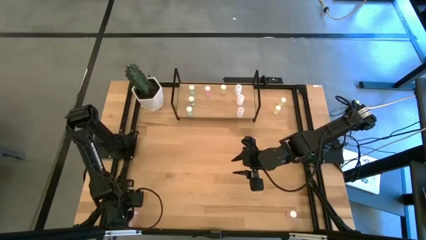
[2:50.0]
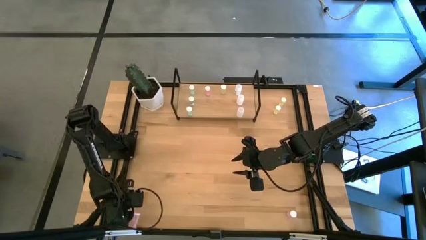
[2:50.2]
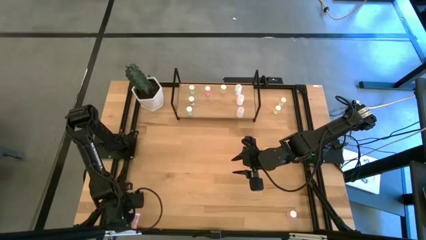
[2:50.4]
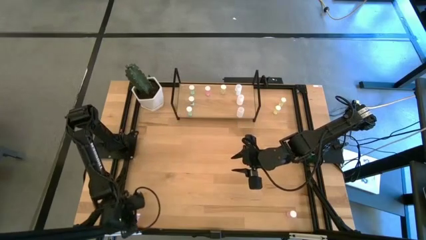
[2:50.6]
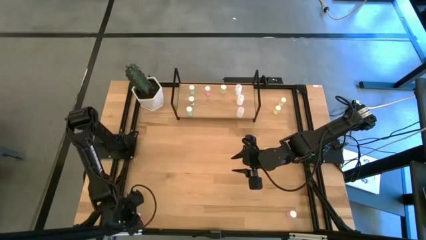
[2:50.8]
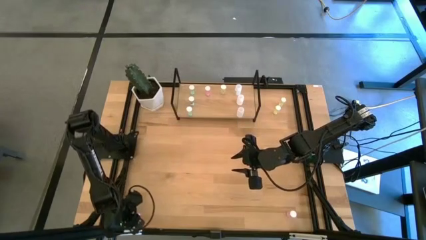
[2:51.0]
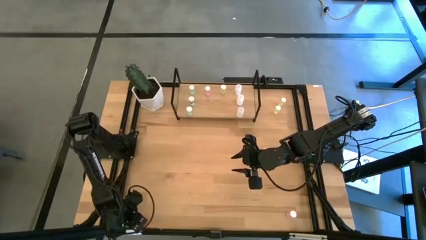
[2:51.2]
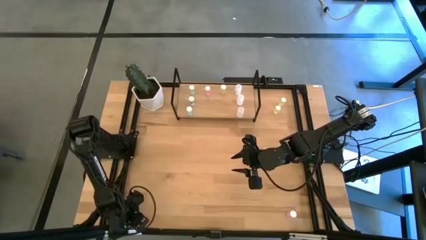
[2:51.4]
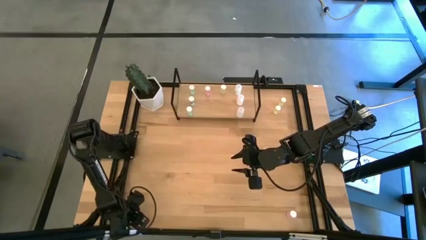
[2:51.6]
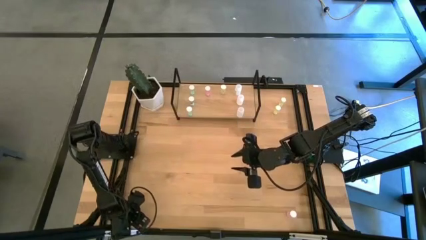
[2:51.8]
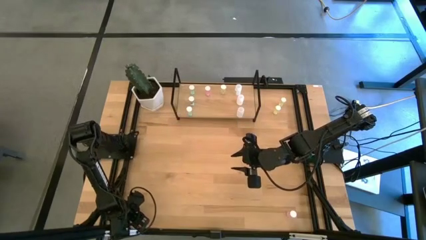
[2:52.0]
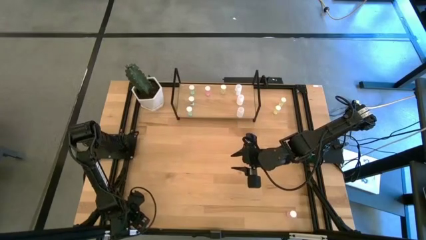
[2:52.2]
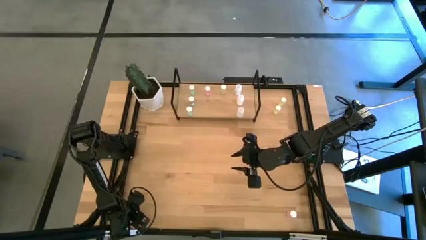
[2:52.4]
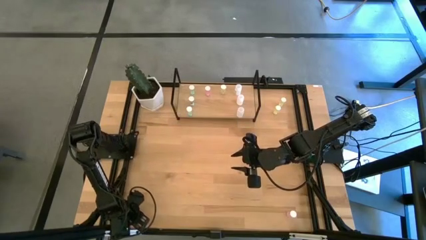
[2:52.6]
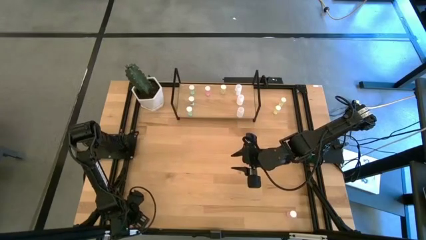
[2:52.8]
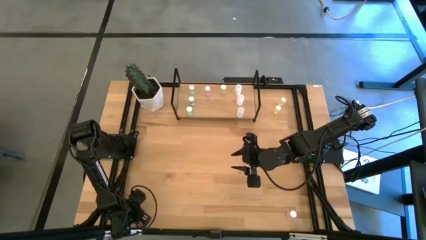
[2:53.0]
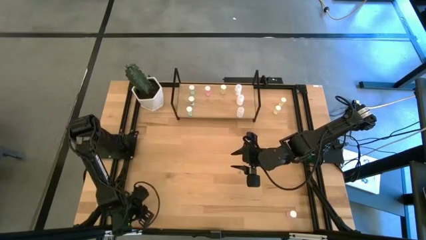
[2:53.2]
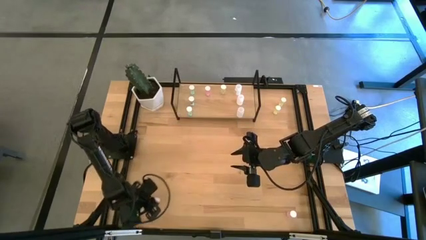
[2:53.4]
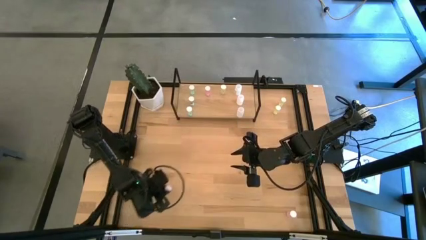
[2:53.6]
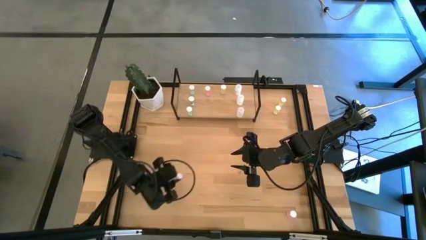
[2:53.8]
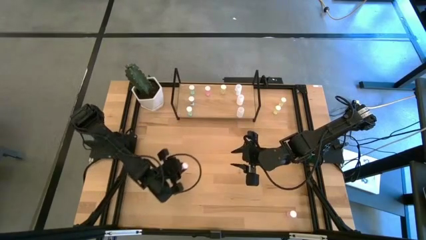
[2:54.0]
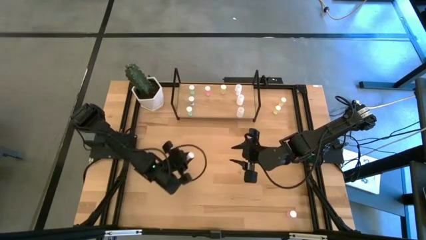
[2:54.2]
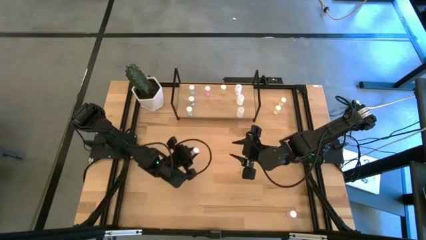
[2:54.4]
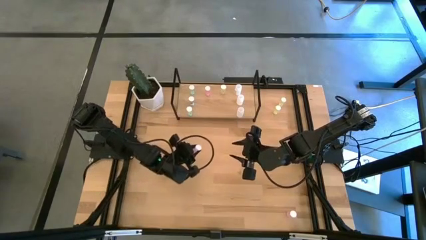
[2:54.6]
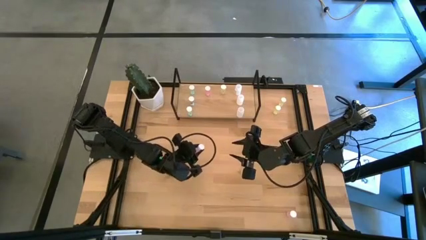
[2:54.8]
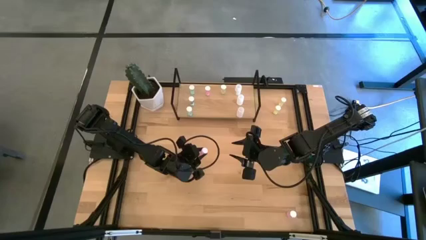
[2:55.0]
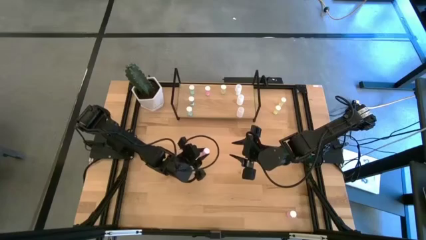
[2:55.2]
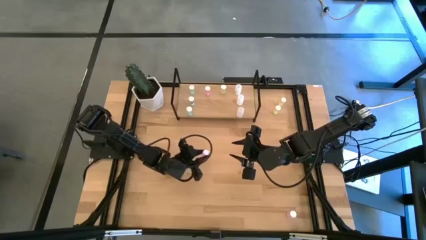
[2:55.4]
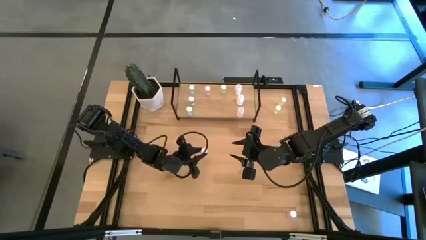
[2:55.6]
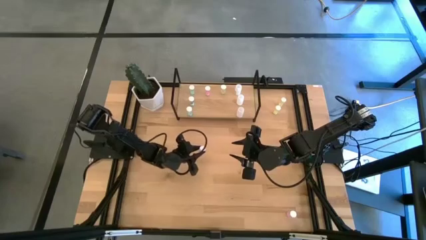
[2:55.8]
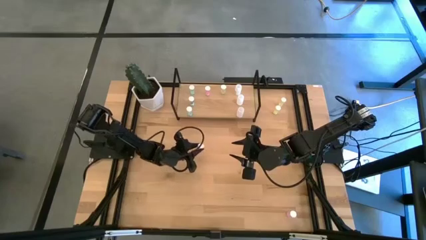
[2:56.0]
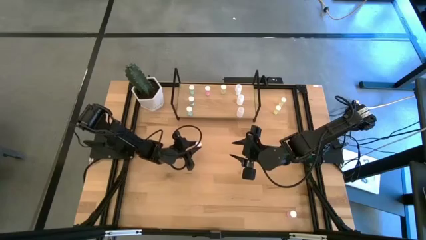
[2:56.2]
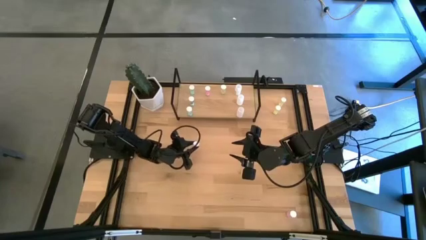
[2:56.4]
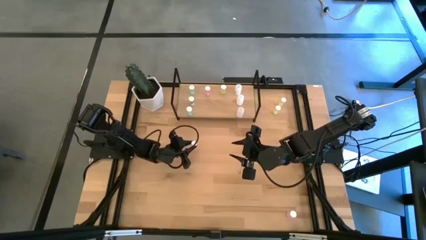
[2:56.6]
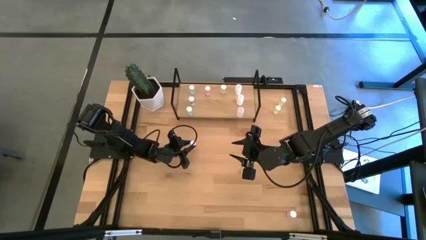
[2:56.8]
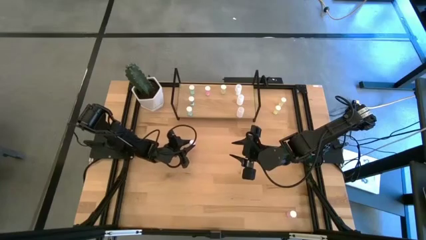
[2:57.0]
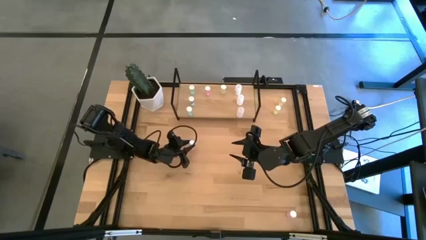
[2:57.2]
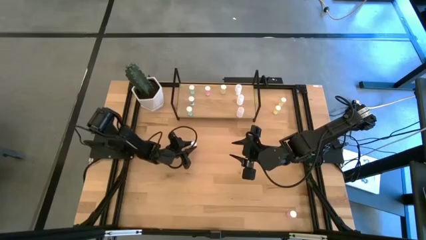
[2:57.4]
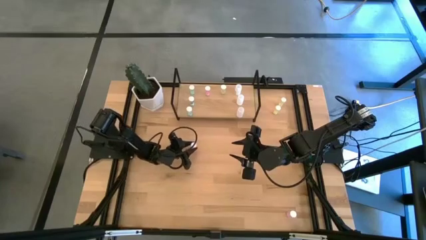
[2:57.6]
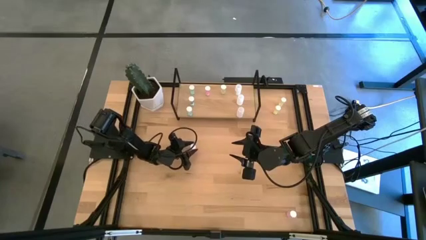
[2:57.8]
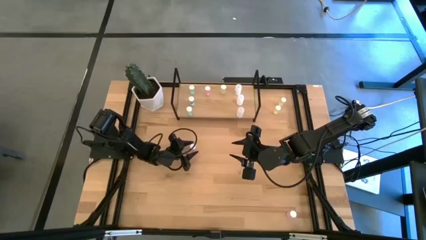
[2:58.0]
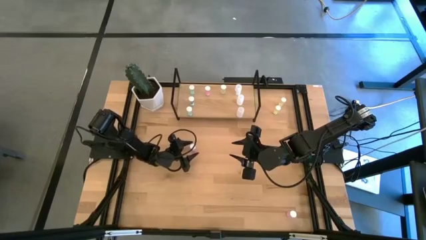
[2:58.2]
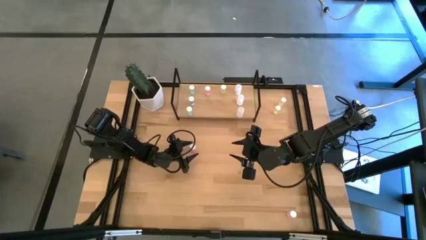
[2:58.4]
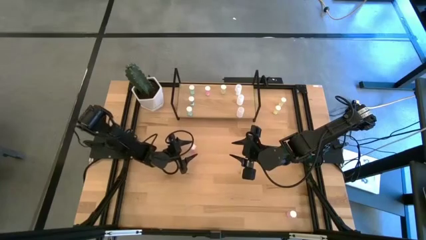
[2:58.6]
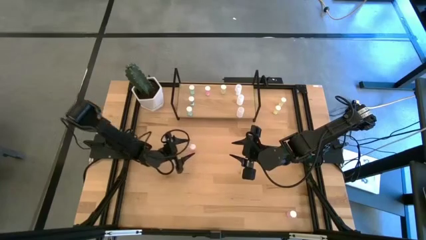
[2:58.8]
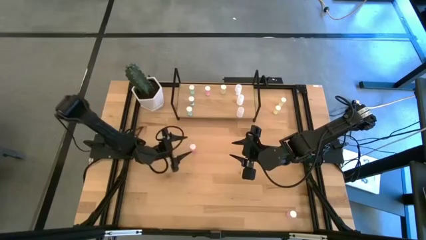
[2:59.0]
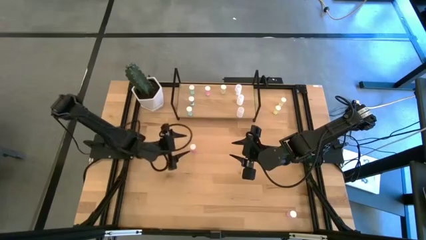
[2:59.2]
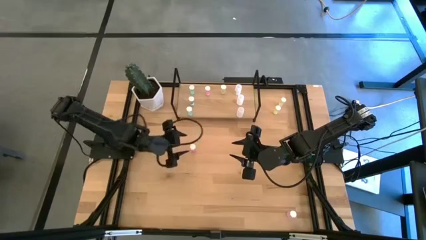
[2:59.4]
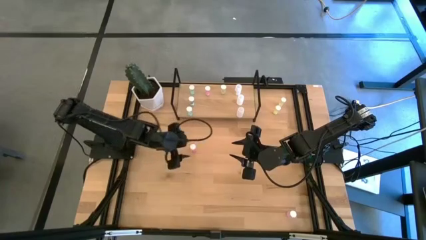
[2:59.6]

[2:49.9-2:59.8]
Task: Pick and place medicine bottles onto shelf by color
Put the left pink pill bottle on the shelf aligned with the other pink pill bottle

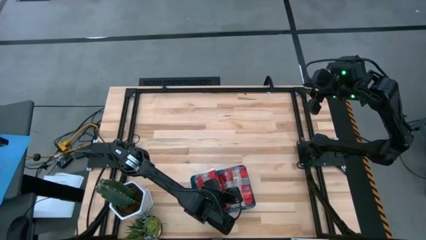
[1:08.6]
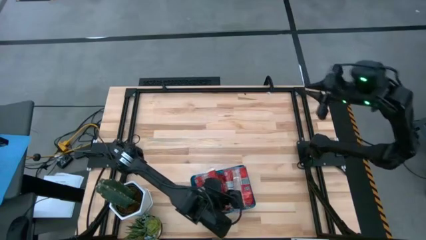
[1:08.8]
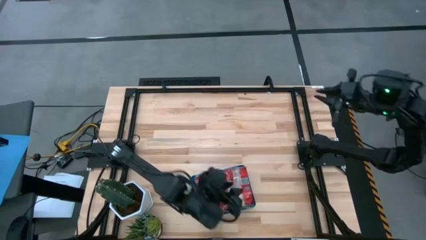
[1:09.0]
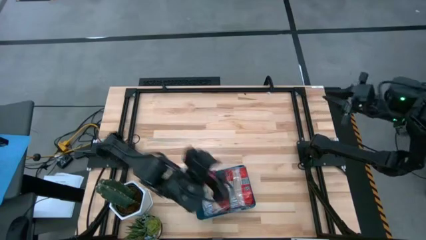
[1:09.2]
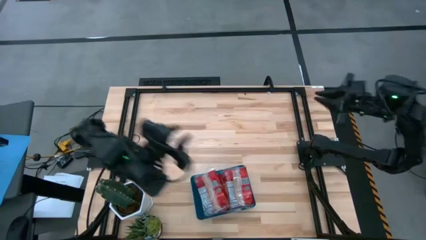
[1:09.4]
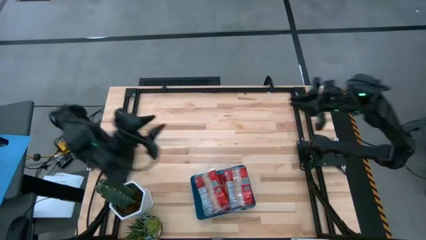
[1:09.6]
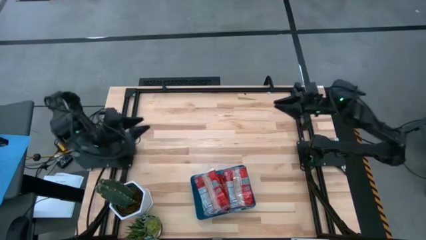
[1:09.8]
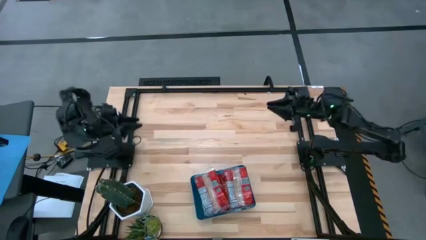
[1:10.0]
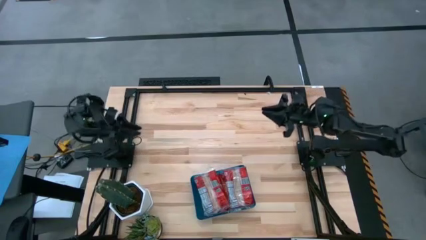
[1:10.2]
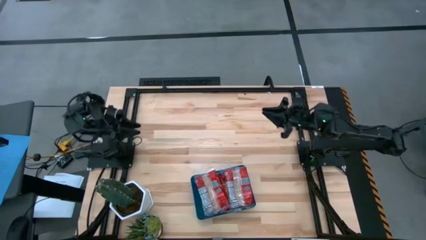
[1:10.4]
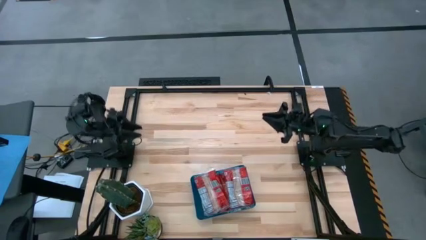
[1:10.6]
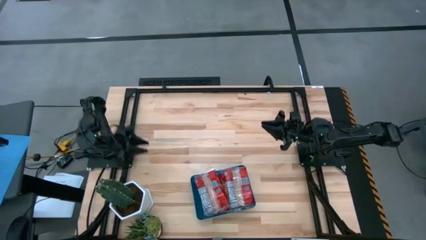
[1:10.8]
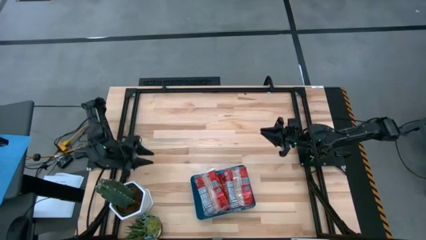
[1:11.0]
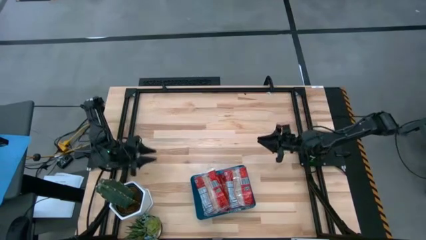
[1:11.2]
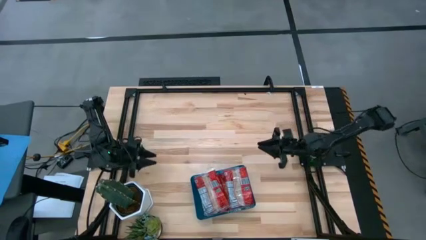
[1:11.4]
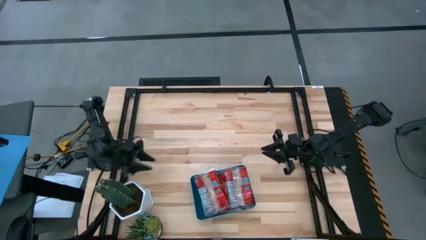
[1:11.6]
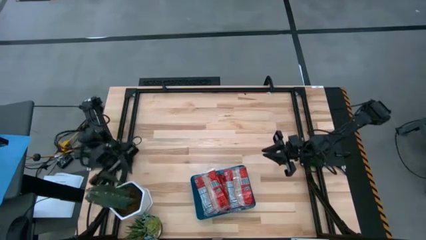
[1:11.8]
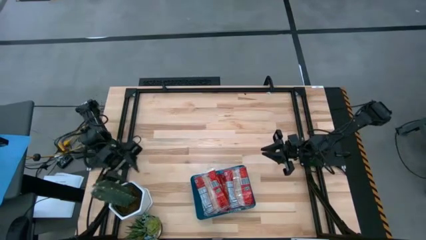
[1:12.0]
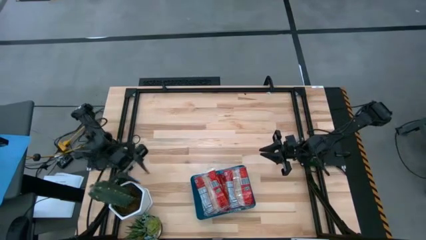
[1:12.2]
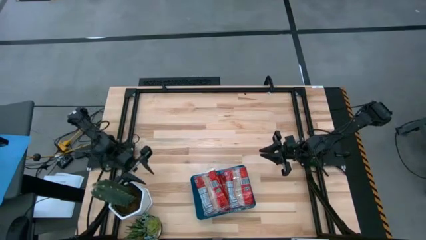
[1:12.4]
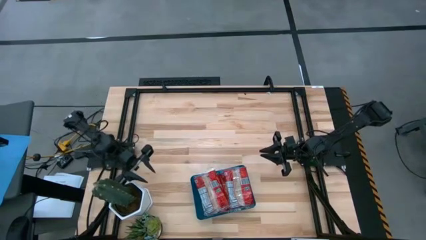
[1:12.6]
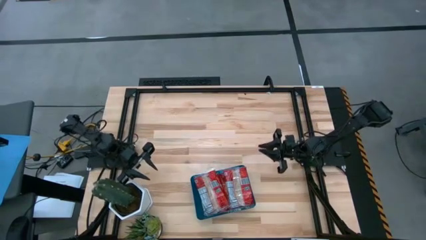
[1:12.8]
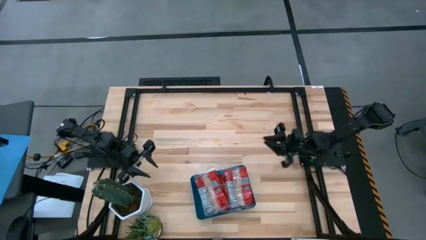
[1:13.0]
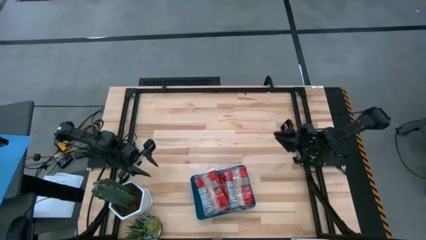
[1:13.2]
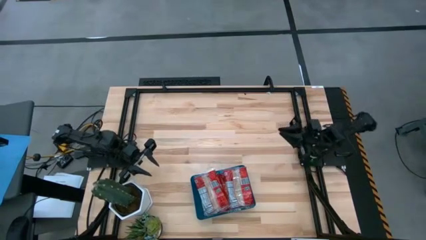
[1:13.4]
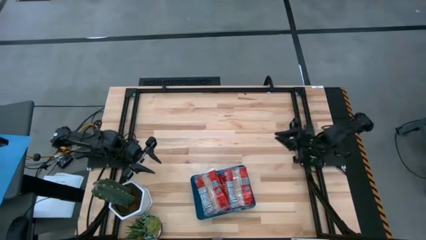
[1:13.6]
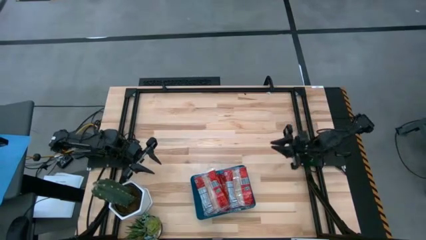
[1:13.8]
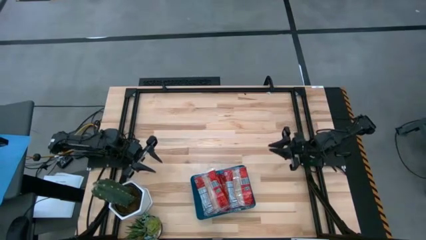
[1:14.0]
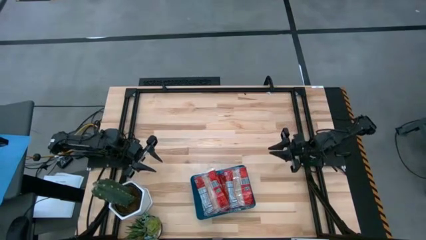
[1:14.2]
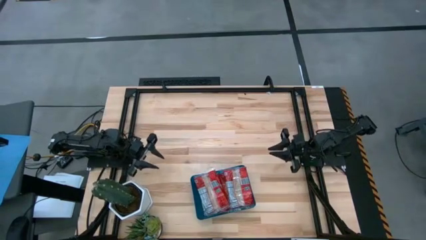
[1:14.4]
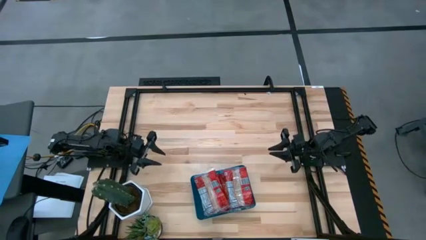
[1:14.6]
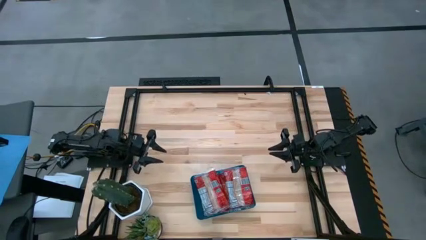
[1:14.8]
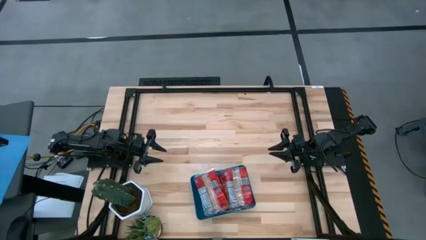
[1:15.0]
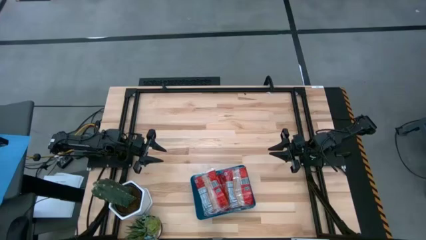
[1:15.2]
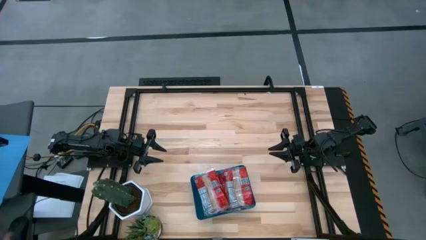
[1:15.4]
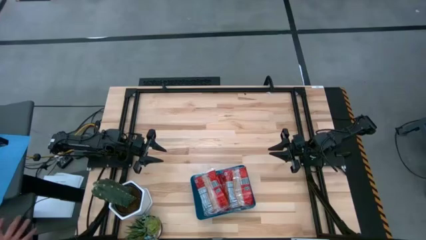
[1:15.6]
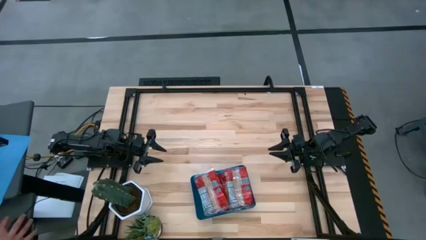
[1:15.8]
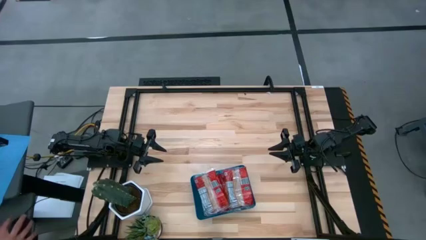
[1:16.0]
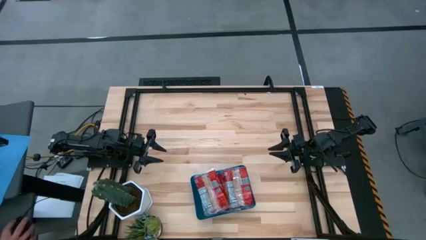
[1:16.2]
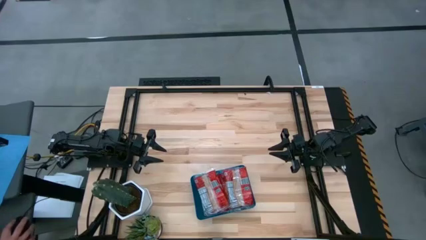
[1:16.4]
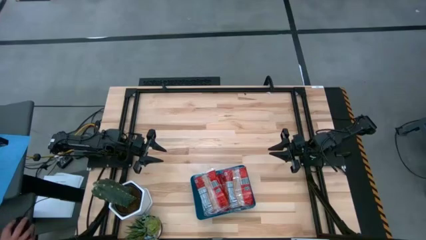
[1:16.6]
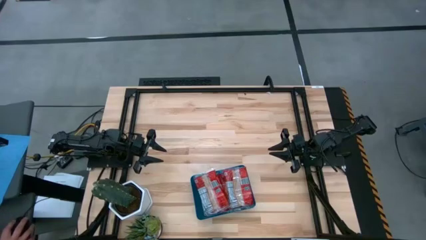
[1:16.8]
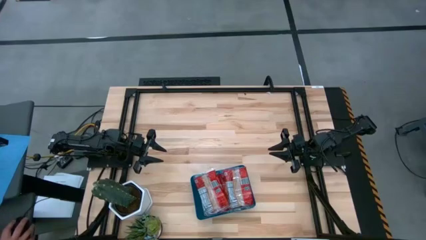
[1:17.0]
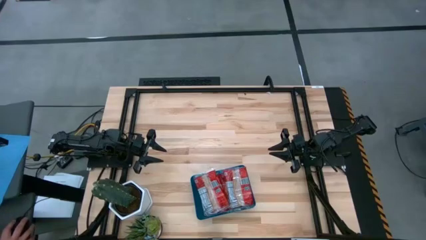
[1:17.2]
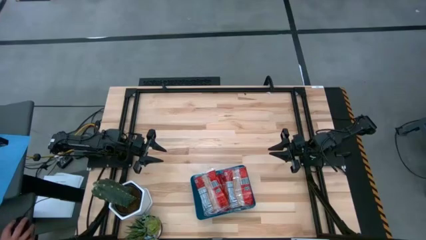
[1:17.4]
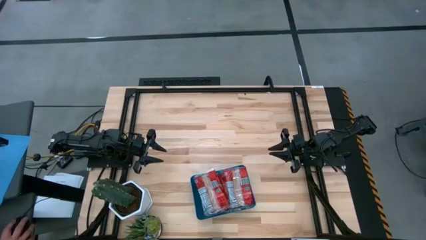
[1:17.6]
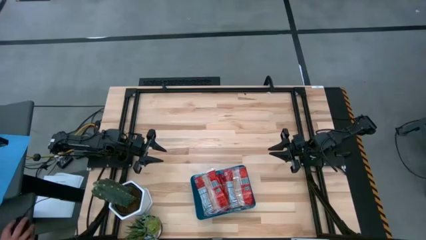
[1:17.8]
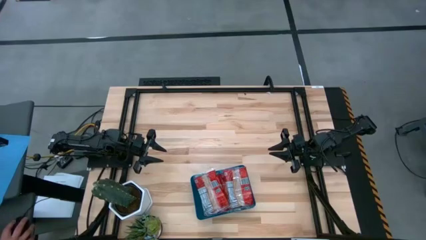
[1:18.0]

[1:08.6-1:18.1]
Task: Sort popcorn bags into baskets
Return to Home Position
